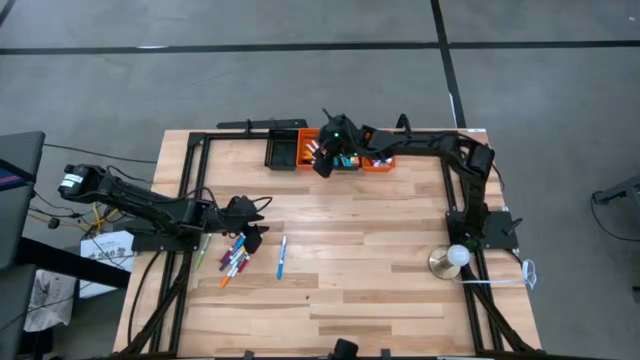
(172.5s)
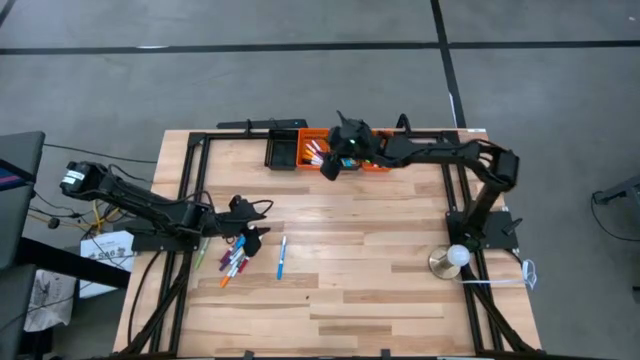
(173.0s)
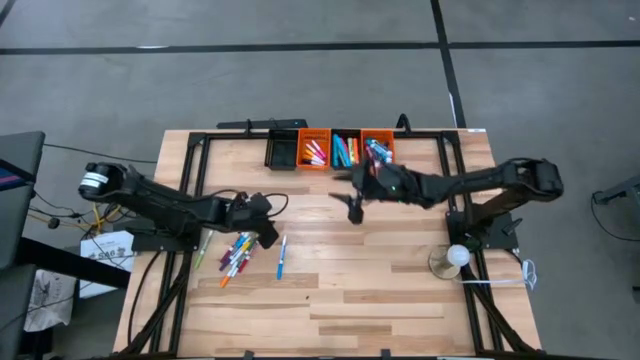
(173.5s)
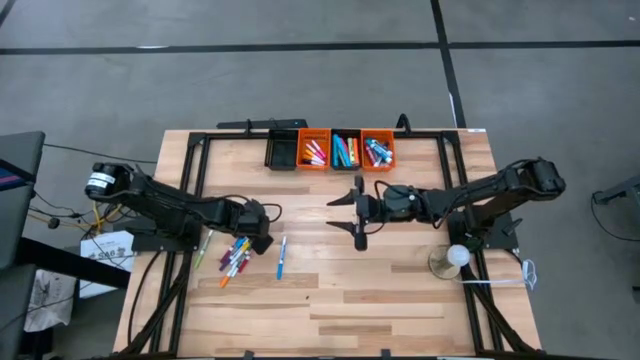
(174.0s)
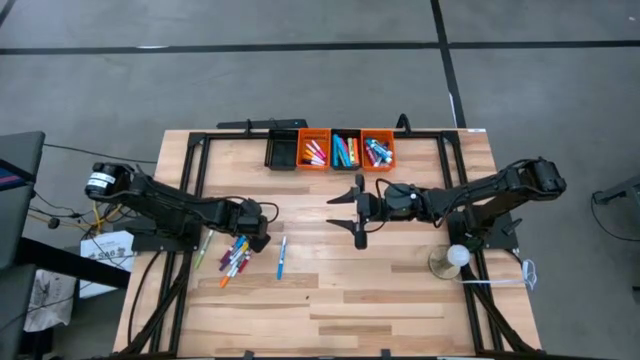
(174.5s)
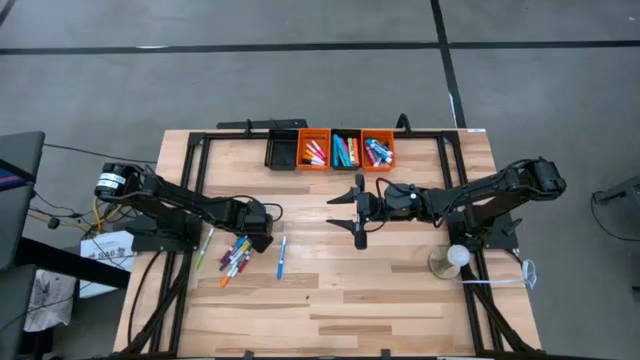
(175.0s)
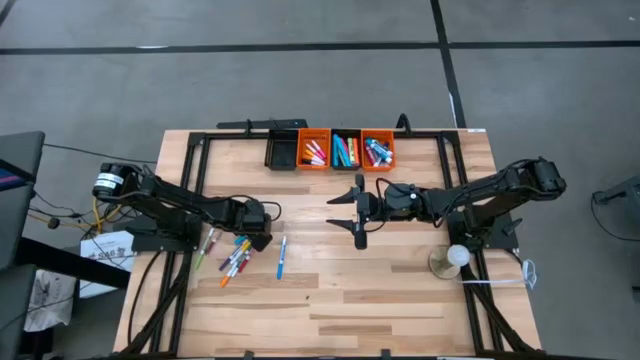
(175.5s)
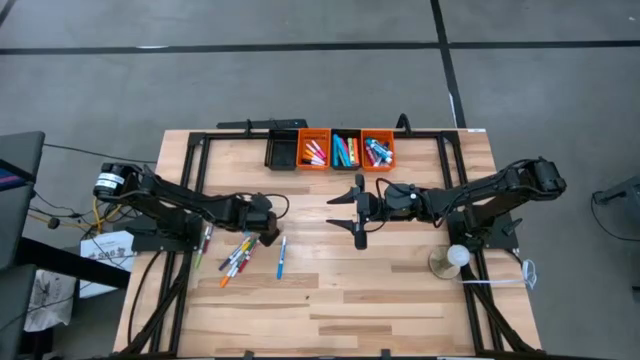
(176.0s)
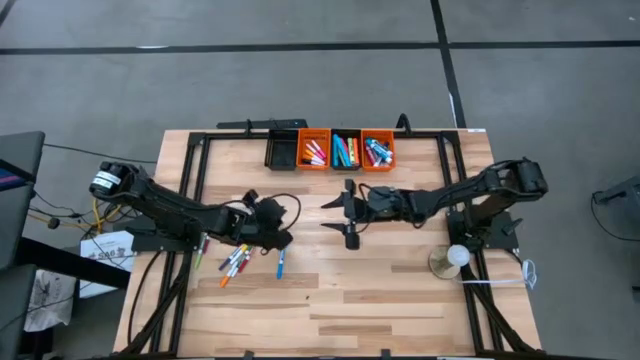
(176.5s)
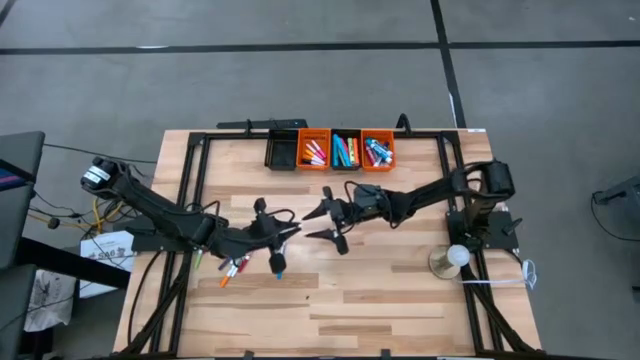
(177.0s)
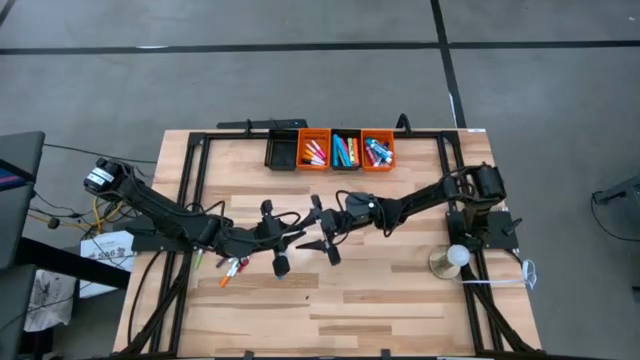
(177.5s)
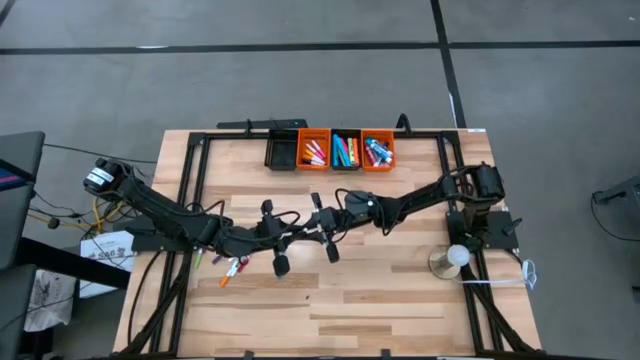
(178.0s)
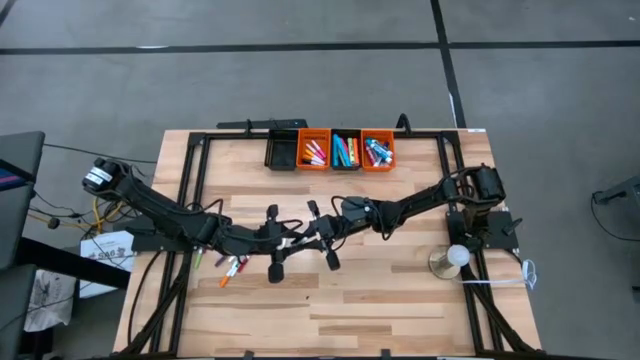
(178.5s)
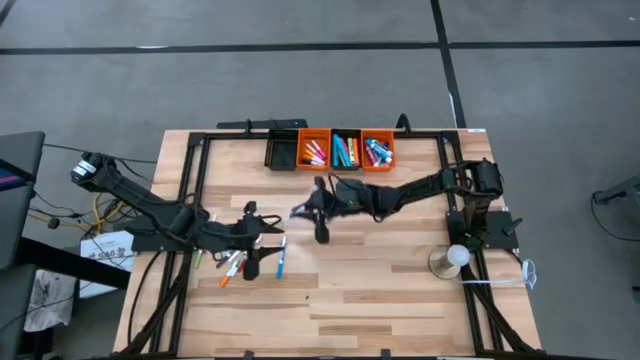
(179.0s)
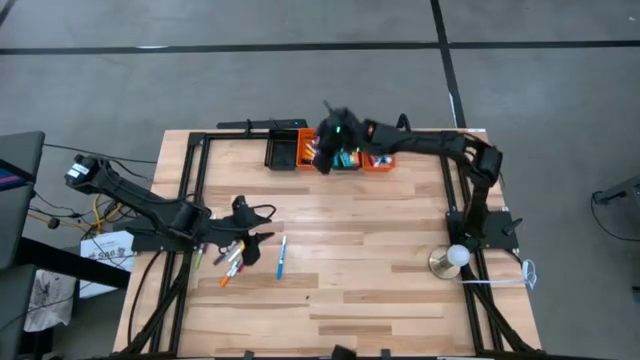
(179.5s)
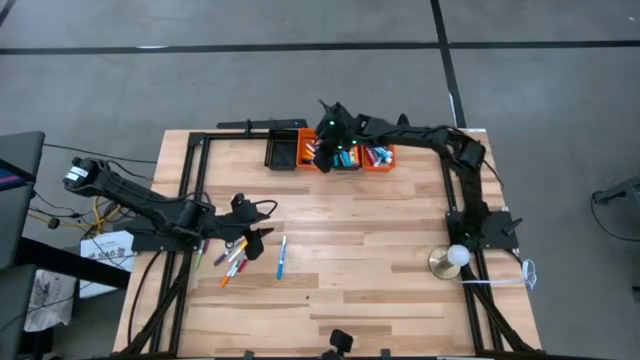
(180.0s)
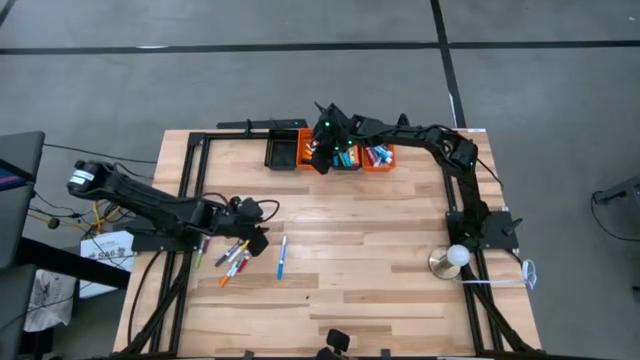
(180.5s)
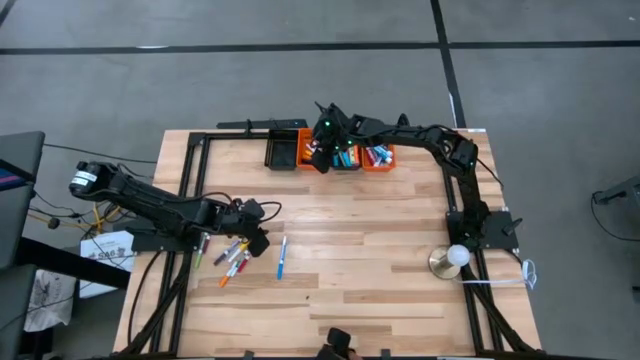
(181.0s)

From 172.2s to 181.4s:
Task: Pick & Place Markers
Put the light blue white highlighter pen into the left orange bin

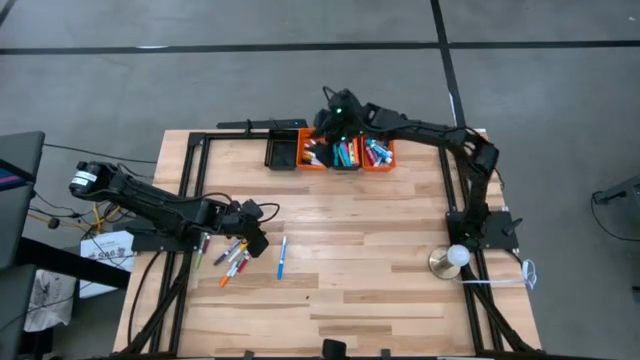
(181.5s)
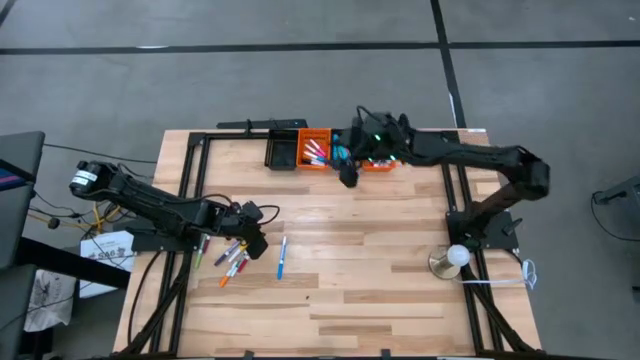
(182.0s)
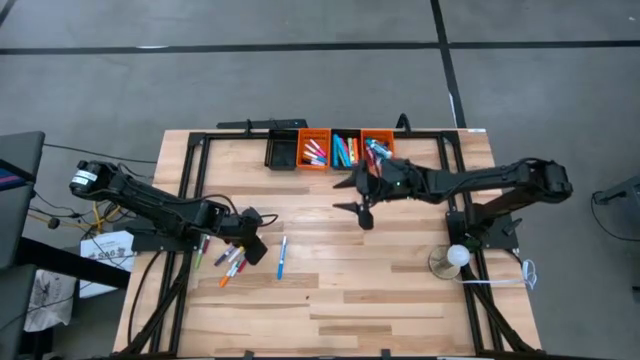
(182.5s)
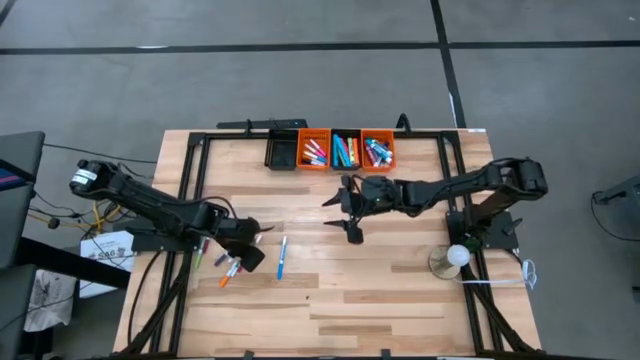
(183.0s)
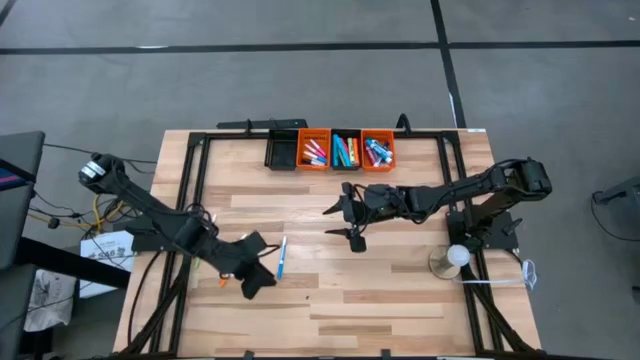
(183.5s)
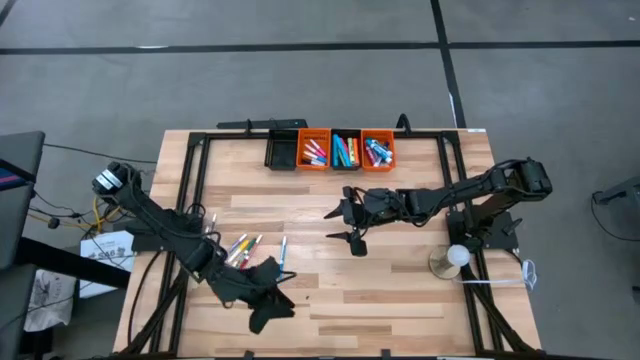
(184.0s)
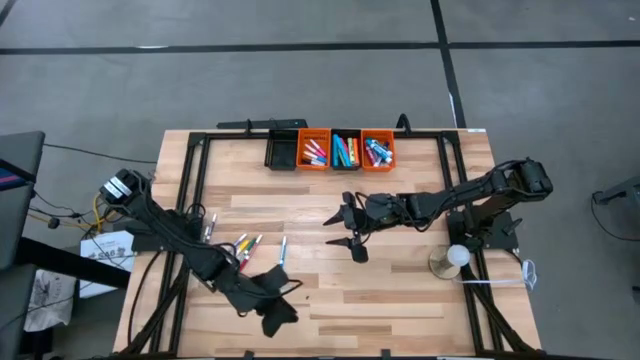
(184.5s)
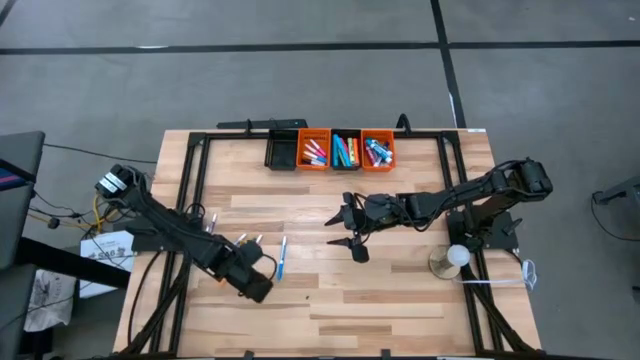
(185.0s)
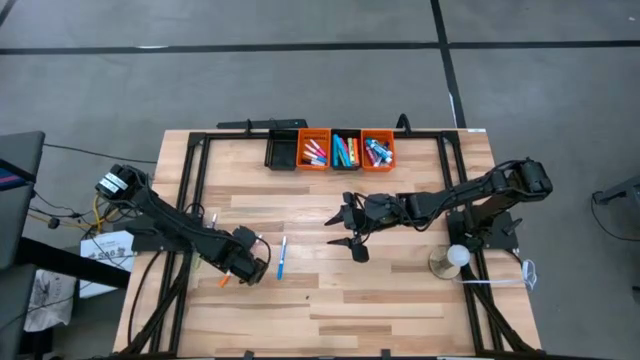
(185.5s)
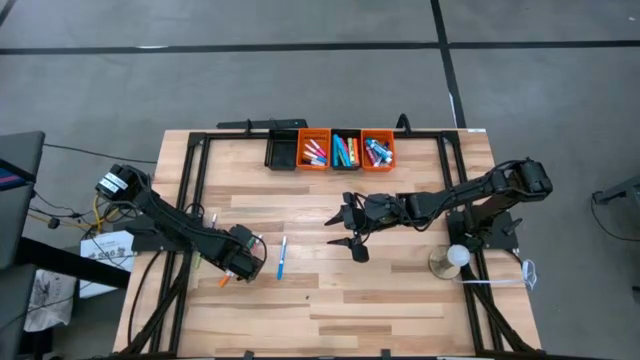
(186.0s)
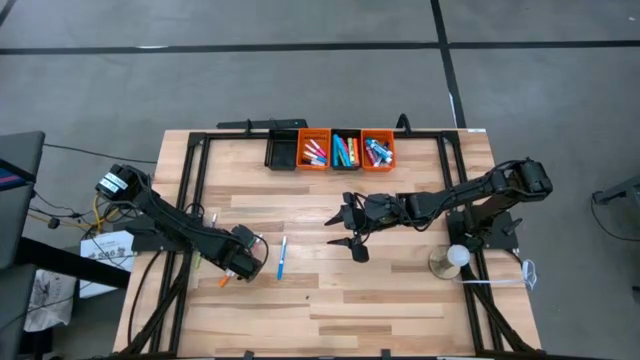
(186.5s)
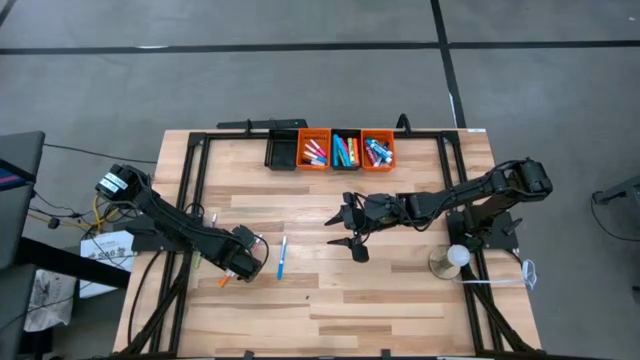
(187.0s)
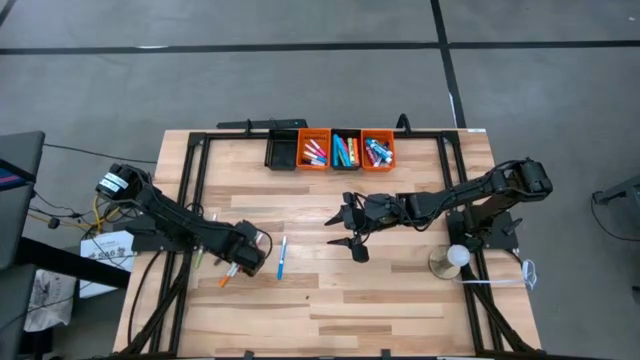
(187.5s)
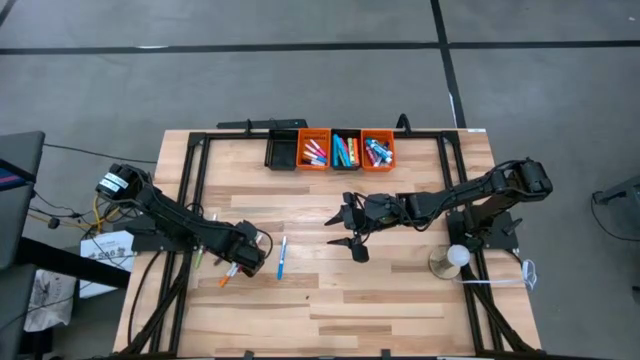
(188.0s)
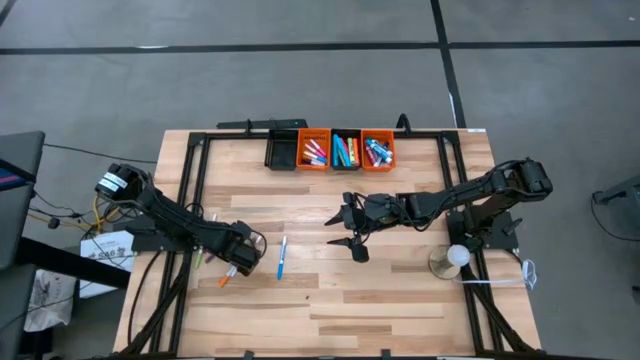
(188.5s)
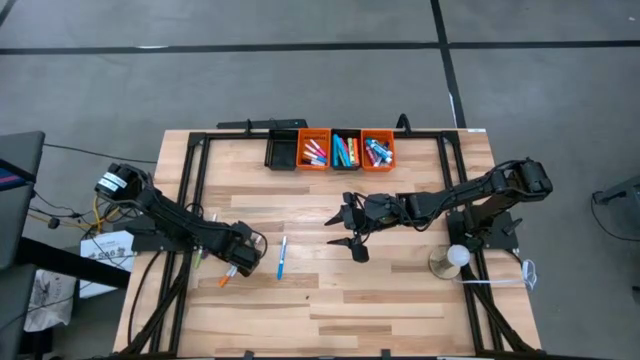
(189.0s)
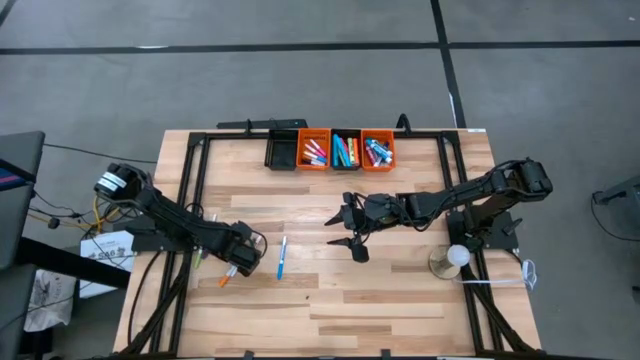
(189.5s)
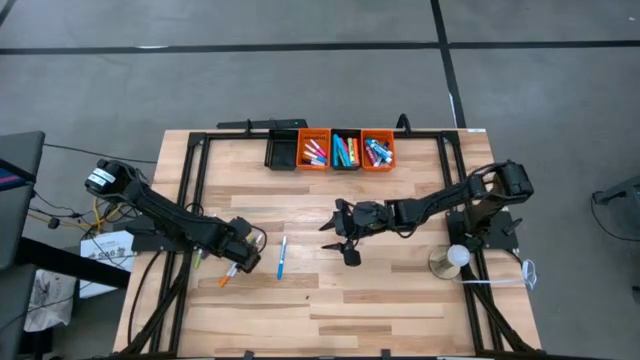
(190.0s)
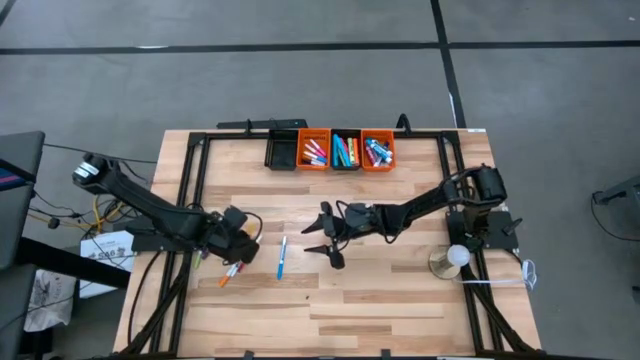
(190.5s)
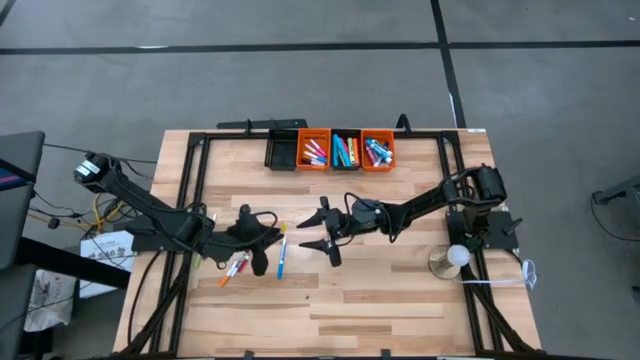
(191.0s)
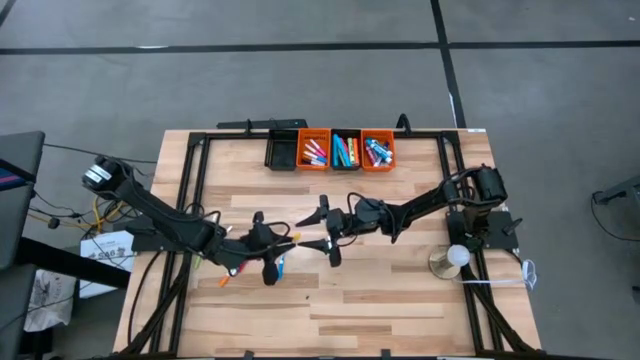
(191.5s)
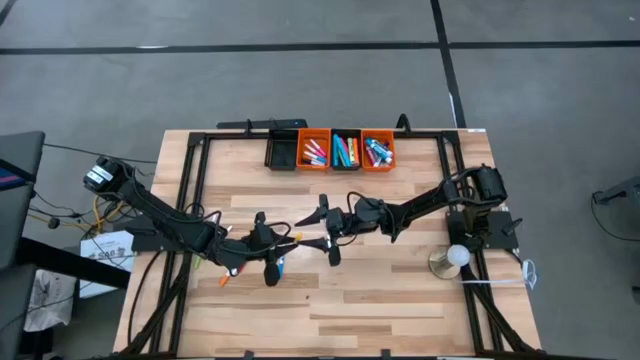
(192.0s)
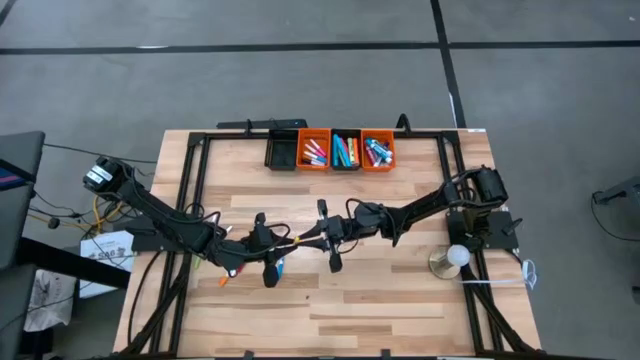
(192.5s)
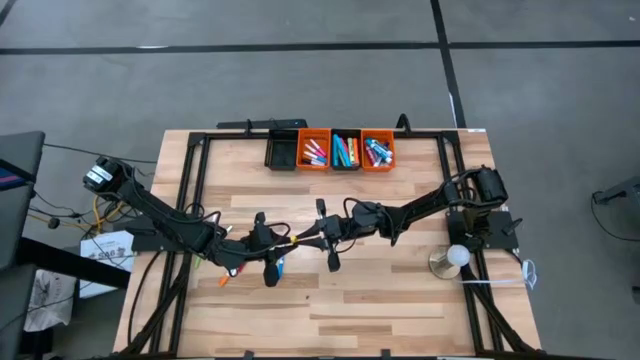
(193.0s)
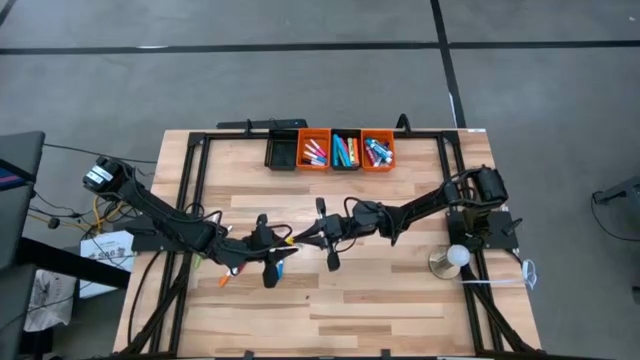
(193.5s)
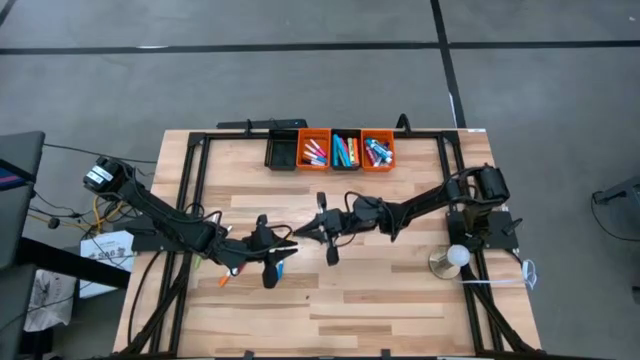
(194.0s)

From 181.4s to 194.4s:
Put the white yellow highlighter pen into the left orange bin
